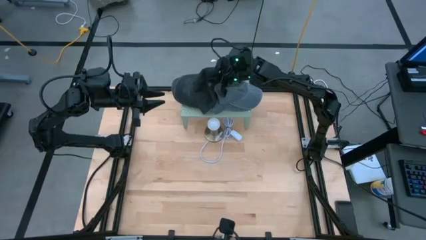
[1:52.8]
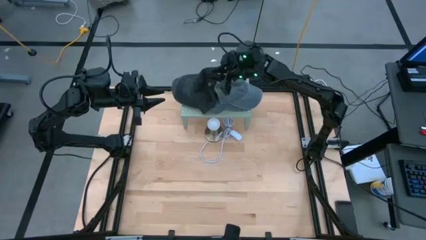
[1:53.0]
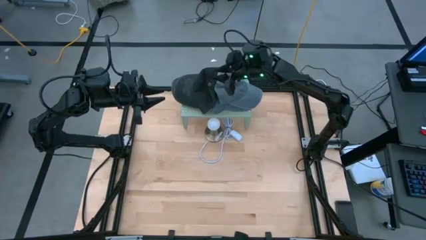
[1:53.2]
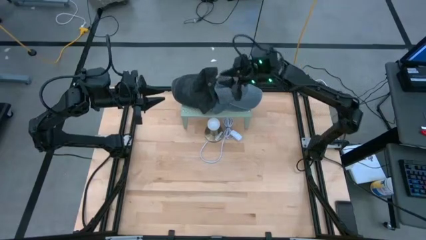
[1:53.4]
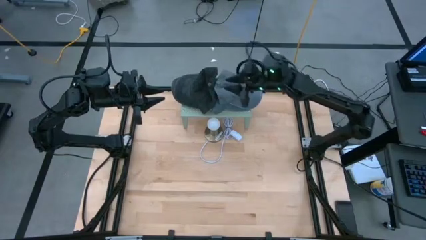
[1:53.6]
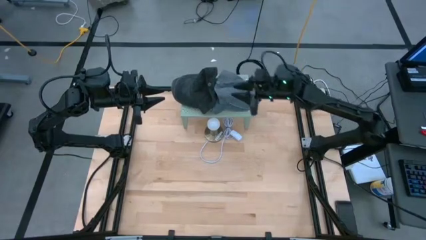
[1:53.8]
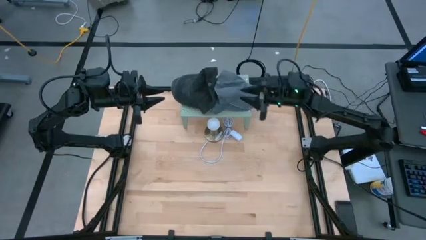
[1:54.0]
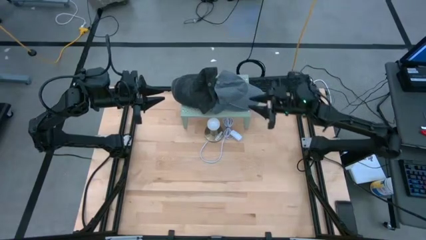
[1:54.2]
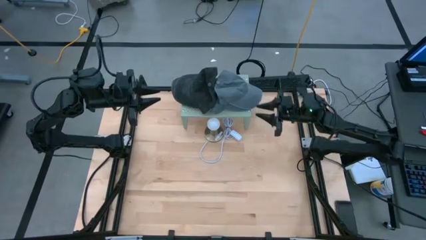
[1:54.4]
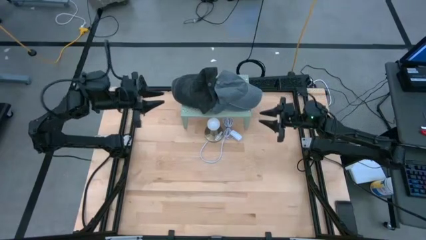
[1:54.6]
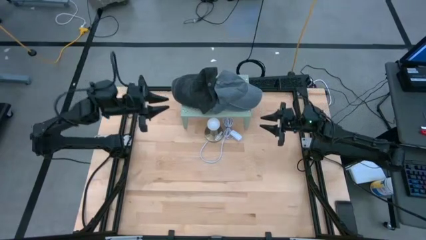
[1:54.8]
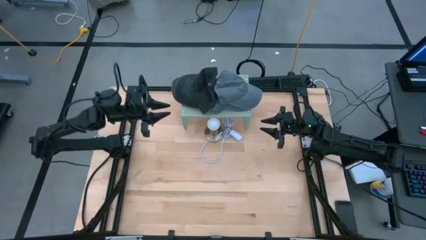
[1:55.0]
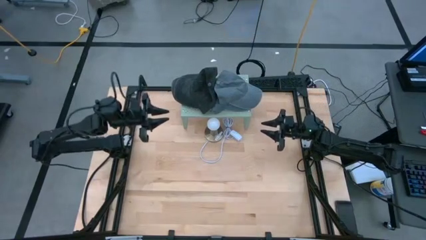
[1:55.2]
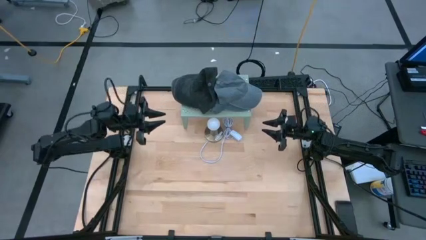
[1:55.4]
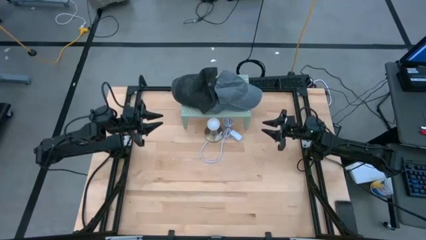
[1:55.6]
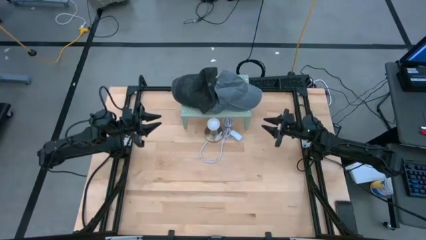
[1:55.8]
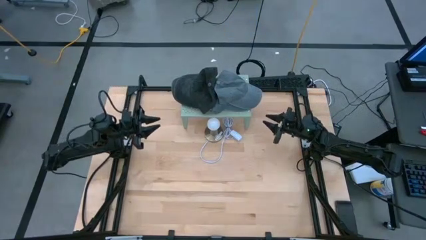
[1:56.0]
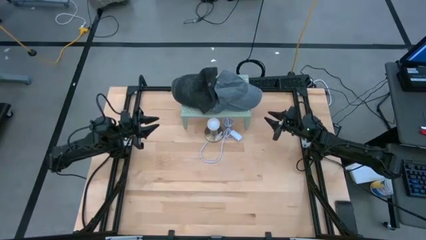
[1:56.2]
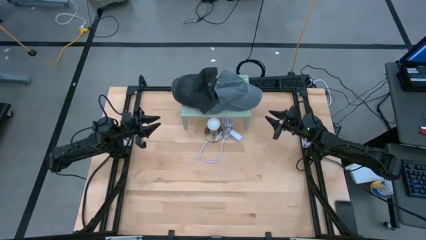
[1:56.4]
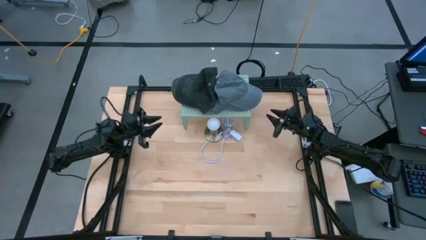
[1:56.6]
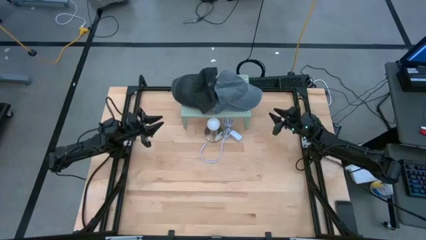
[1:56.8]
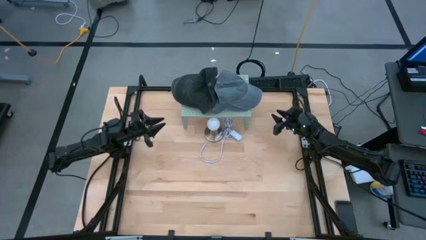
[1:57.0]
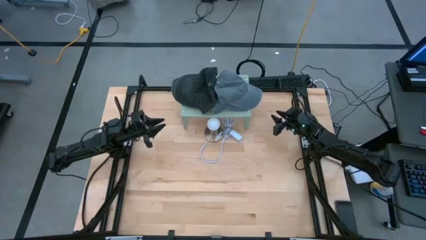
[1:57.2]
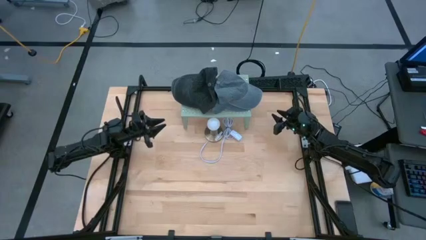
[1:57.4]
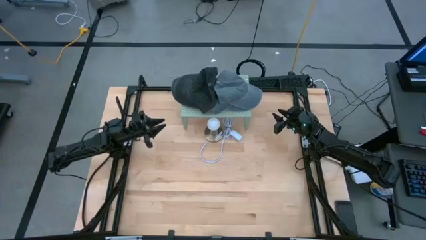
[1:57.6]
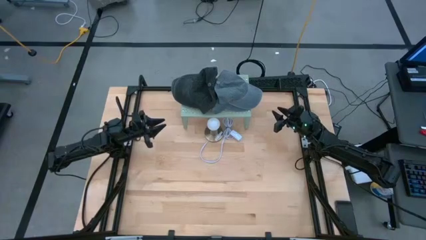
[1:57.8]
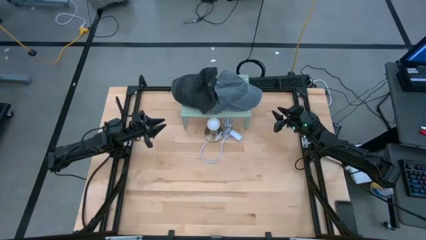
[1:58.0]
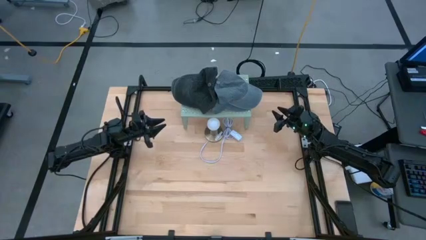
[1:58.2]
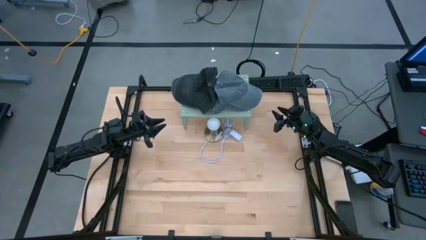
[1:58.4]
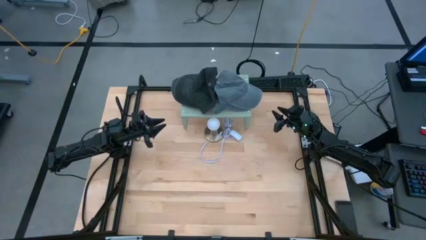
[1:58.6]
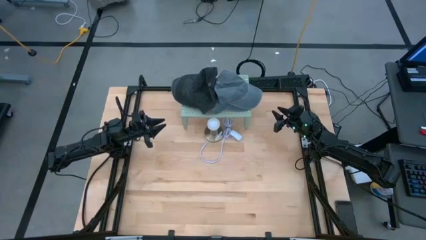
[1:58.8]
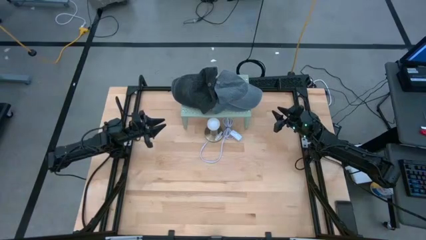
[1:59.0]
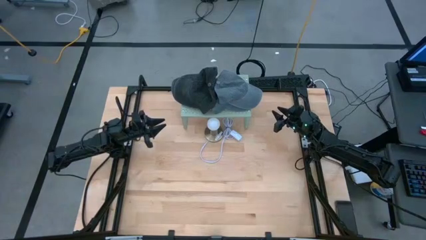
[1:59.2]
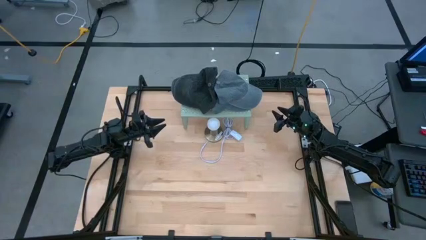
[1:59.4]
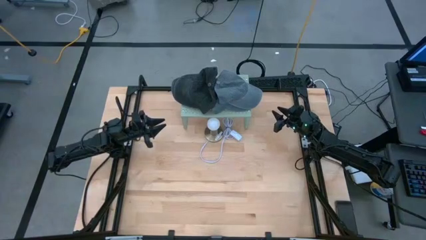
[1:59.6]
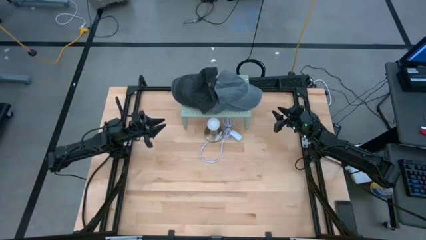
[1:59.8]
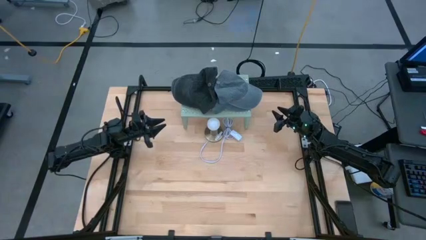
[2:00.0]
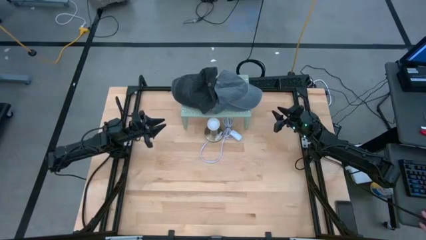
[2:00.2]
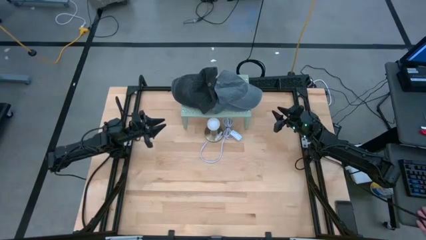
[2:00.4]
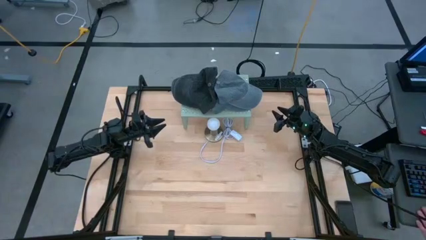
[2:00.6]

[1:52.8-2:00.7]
Task: Pick & Place hat
Return to Home Position

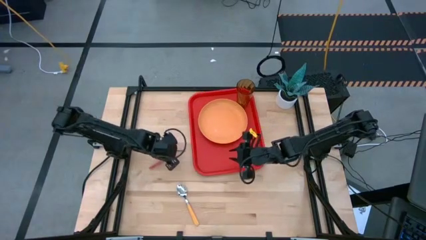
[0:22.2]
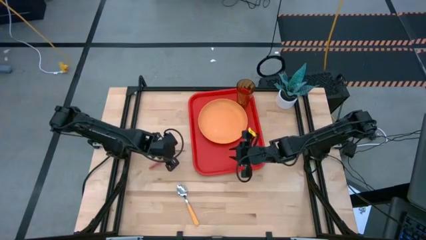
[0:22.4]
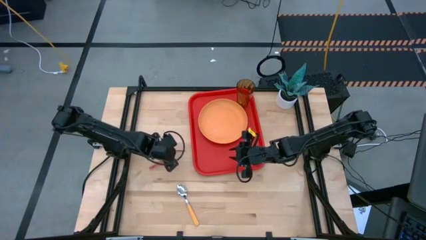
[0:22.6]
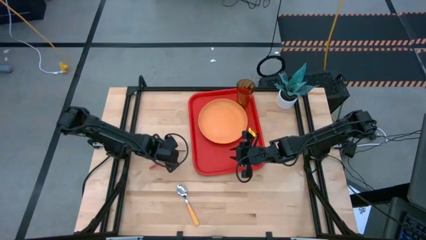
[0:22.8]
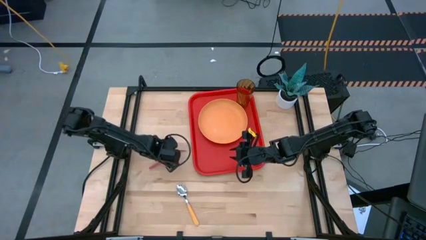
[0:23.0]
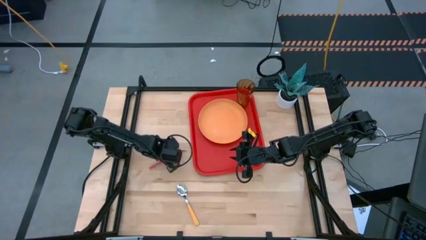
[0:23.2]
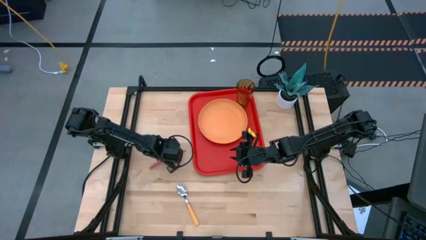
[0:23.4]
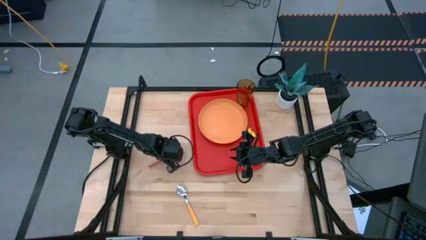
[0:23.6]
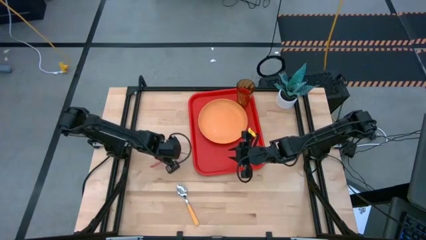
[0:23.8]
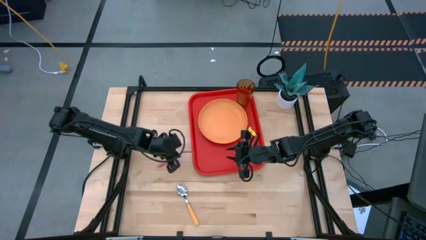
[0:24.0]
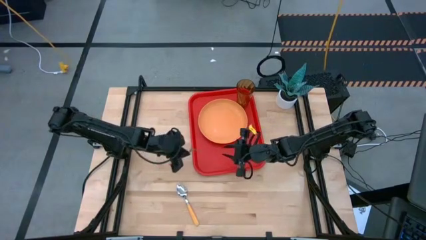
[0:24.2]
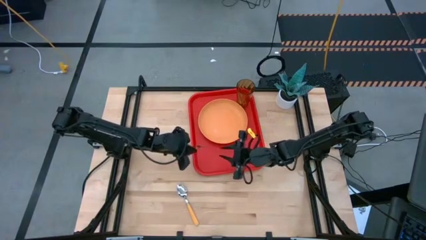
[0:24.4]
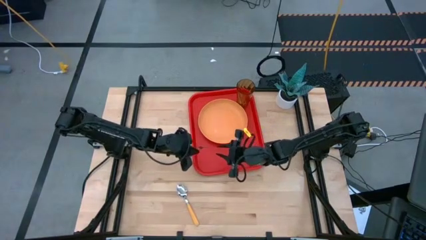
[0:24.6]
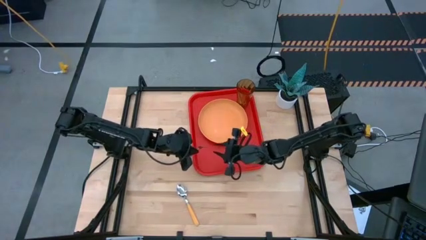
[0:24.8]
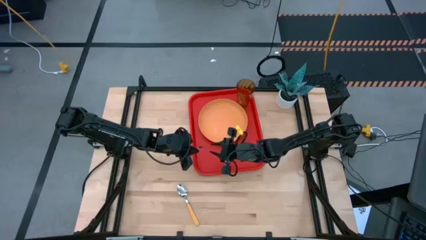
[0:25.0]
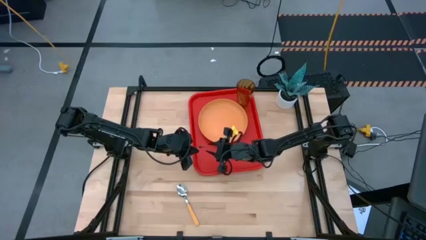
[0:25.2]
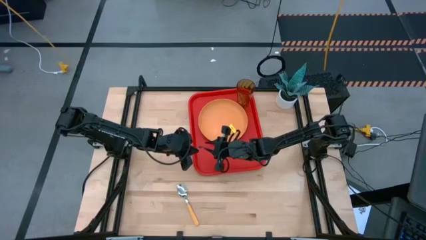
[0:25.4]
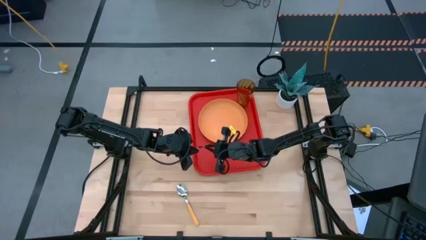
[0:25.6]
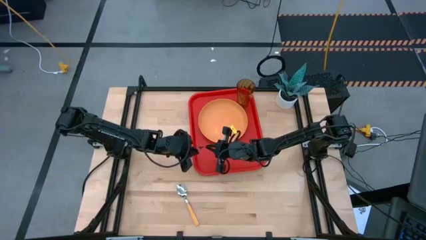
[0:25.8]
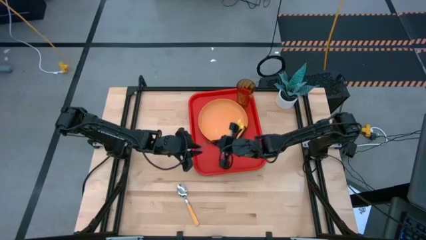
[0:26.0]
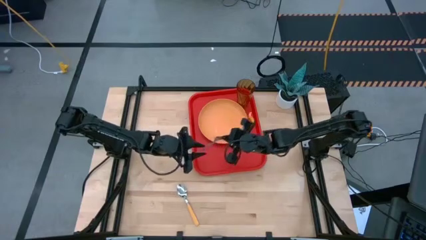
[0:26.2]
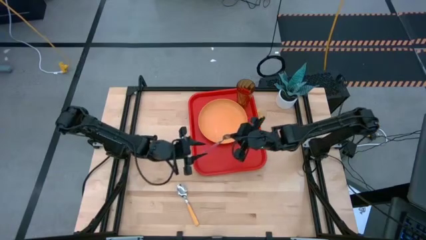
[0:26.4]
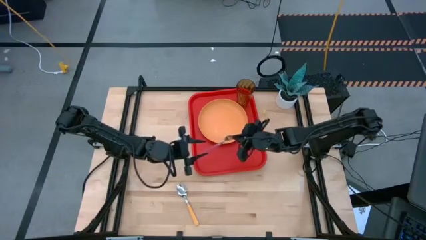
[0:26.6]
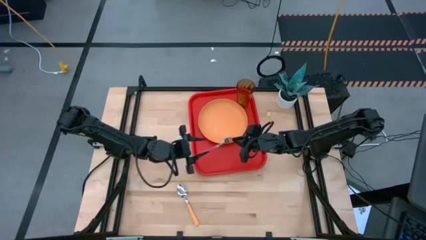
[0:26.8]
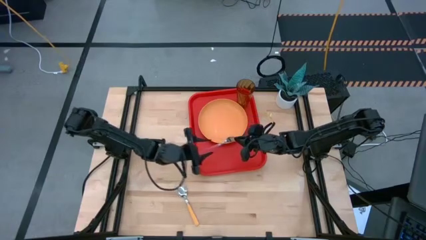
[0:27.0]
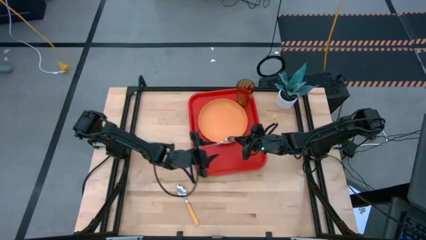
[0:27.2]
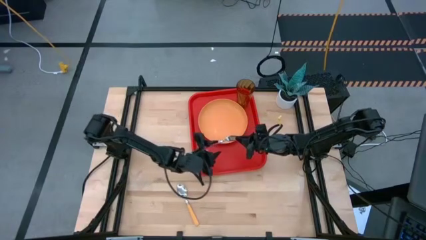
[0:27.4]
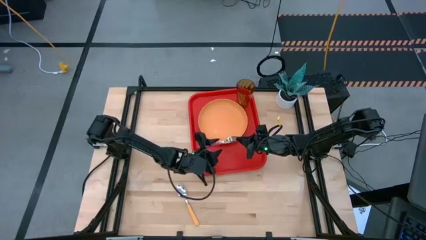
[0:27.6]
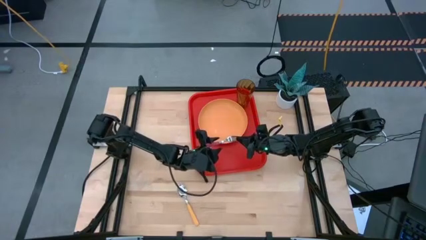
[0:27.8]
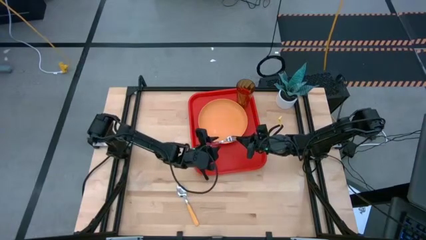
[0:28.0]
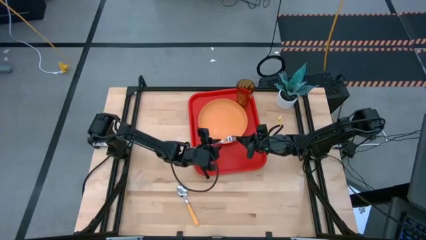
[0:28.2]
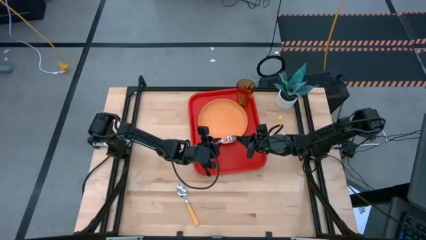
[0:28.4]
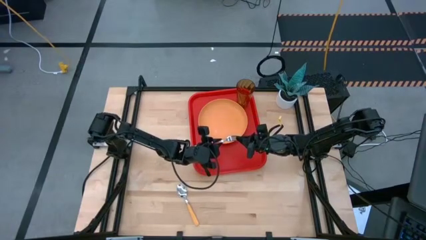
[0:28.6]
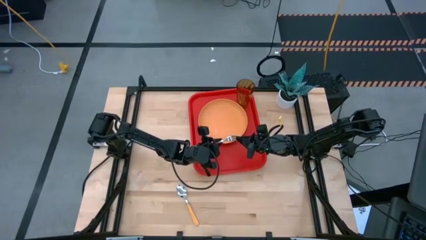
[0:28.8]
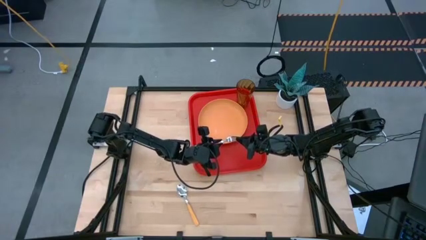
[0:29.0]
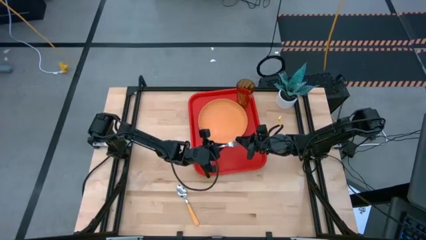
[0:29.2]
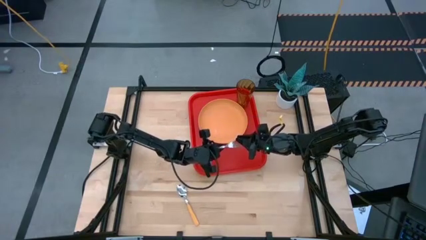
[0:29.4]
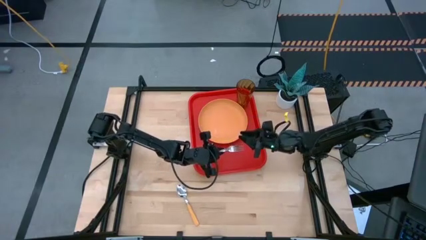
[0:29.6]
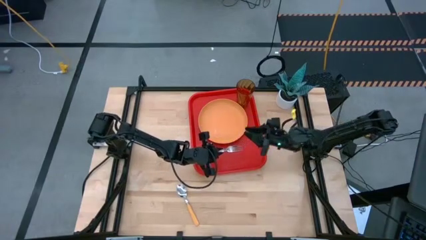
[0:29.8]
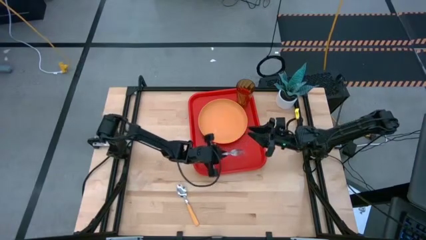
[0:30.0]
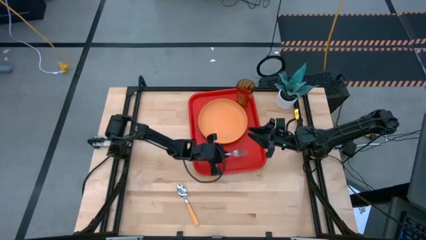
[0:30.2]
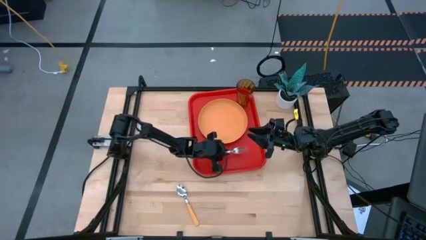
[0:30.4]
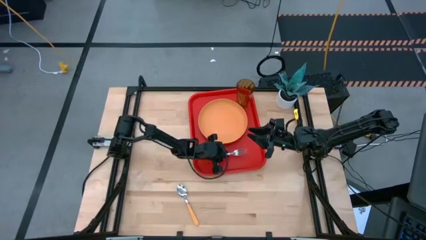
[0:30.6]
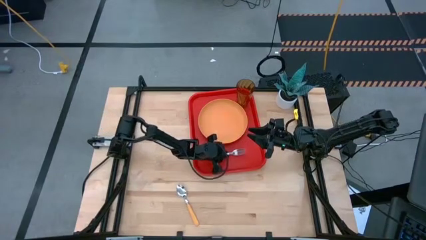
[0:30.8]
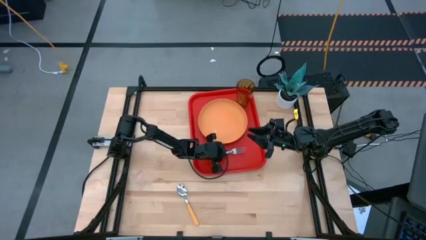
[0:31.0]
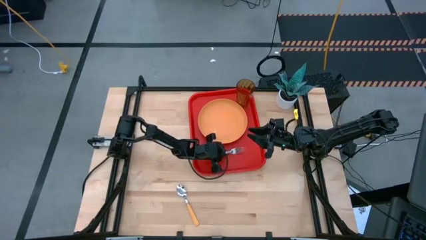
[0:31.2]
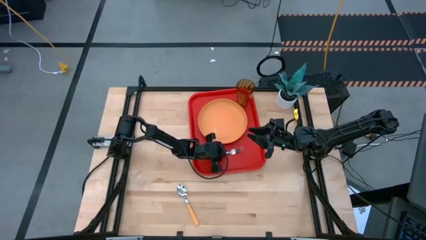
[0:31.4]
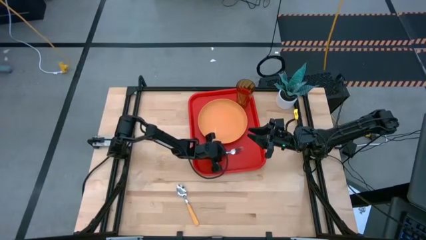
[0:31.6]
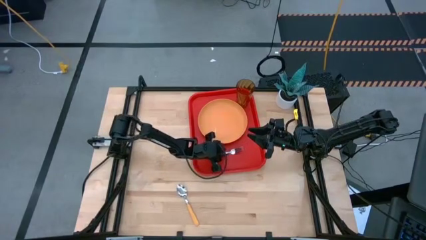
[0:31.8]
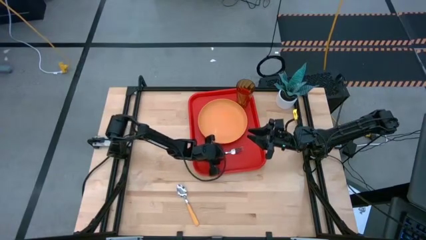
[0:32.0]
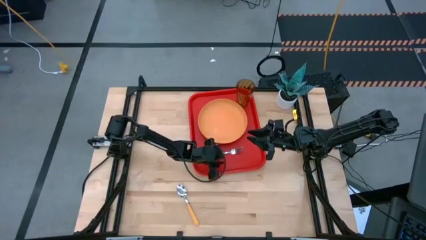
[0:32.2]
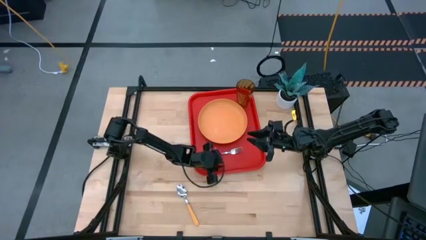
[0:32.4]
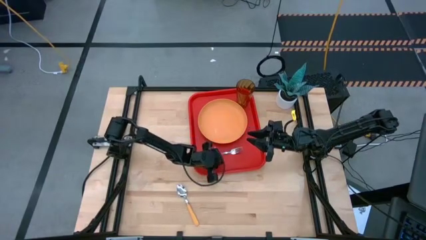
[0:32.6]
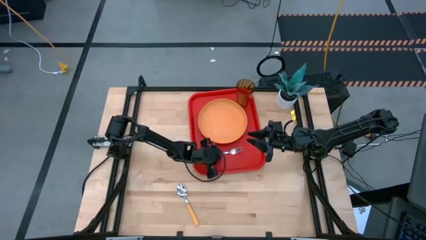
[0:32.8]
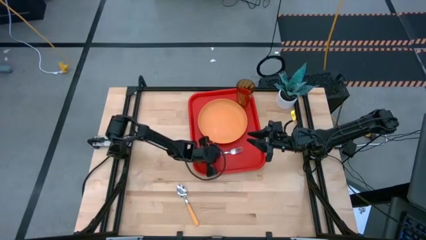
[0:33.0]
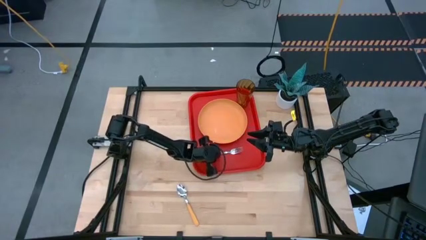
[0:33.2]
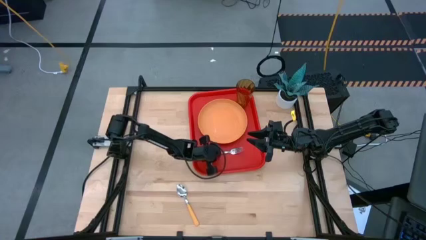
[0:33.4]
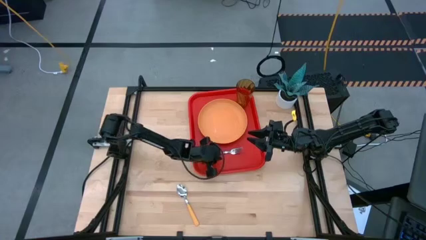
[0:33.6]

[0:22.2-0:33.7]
Task: Pick and place plate/cup/fork/spoon on tray
Put the pink fork on the red serving tray to the bottom of the yellow plate
